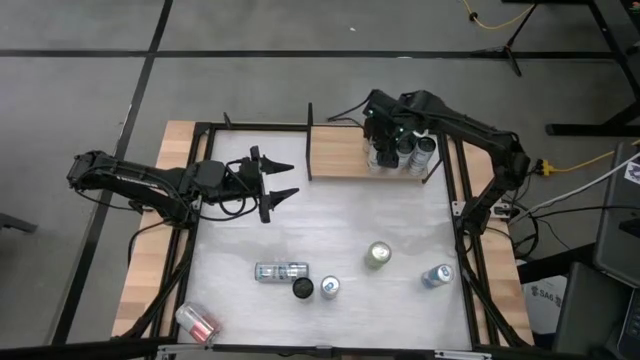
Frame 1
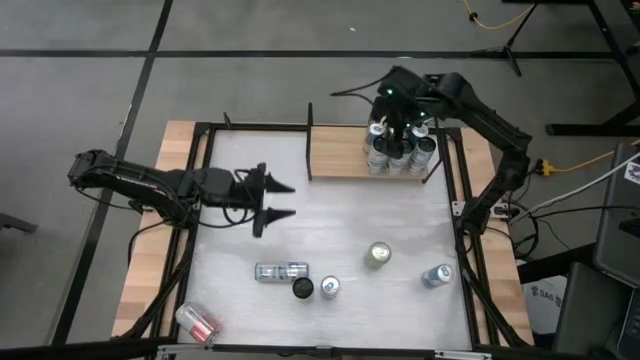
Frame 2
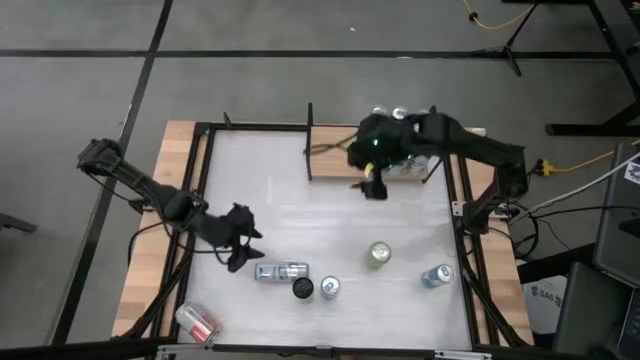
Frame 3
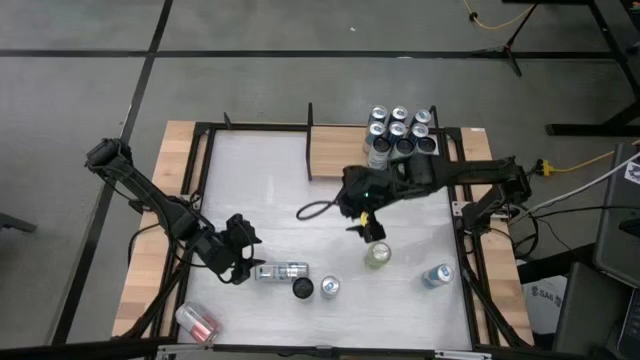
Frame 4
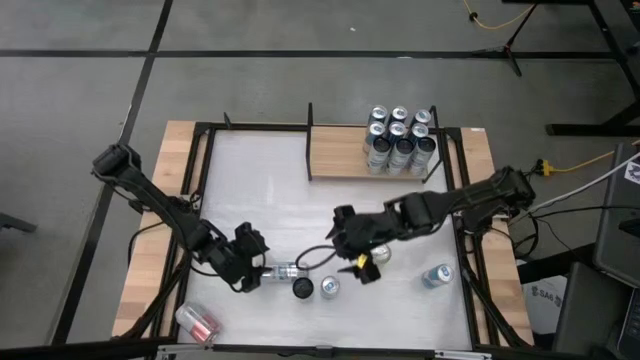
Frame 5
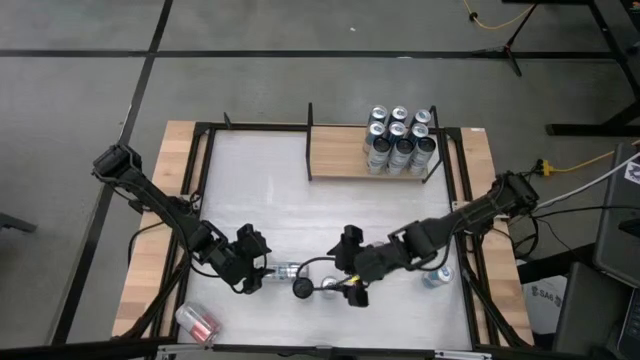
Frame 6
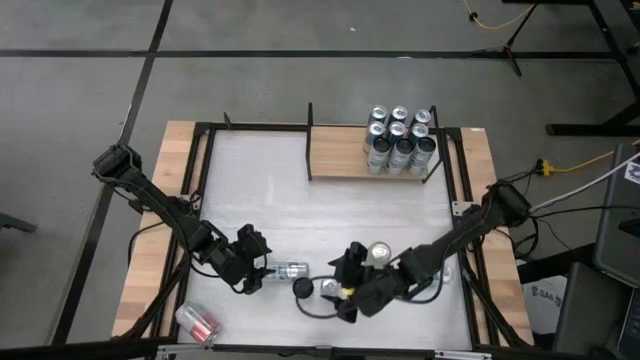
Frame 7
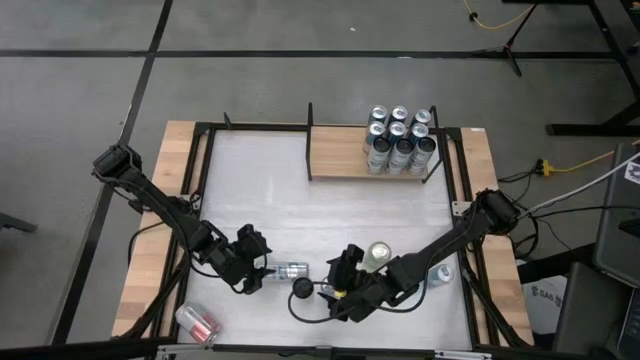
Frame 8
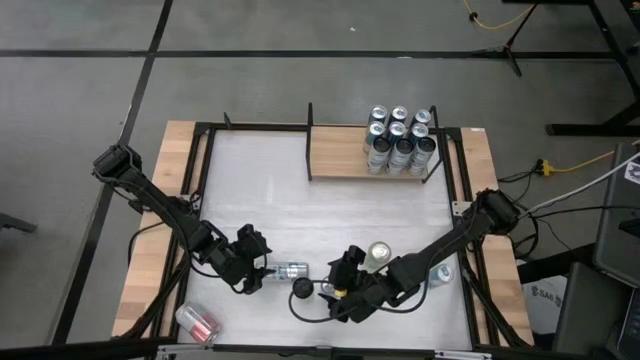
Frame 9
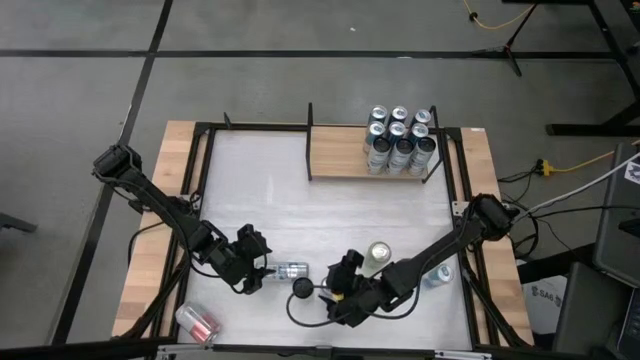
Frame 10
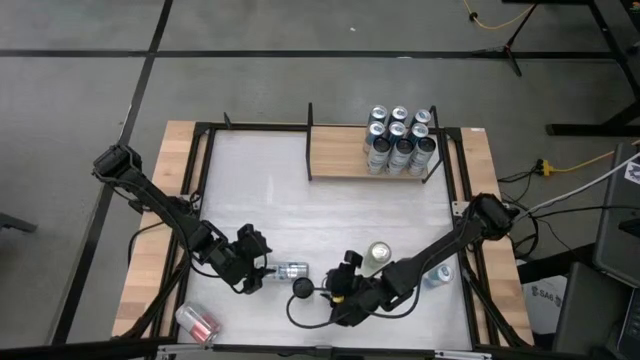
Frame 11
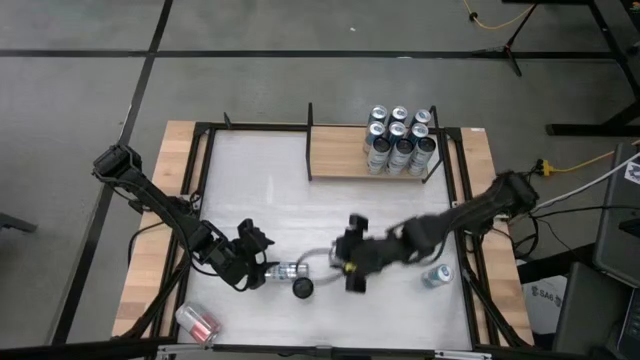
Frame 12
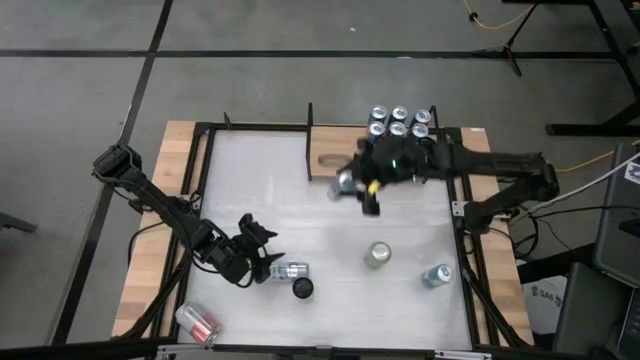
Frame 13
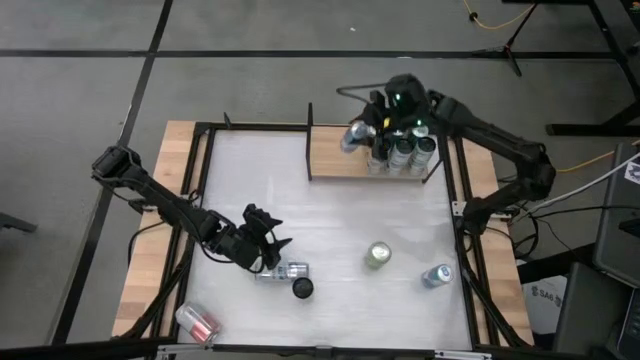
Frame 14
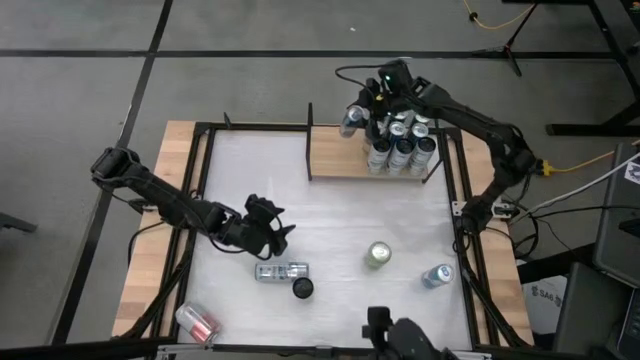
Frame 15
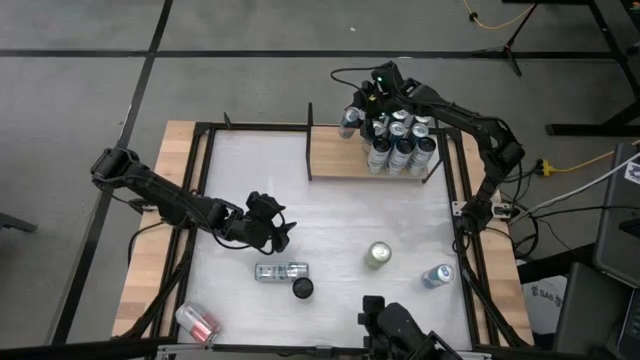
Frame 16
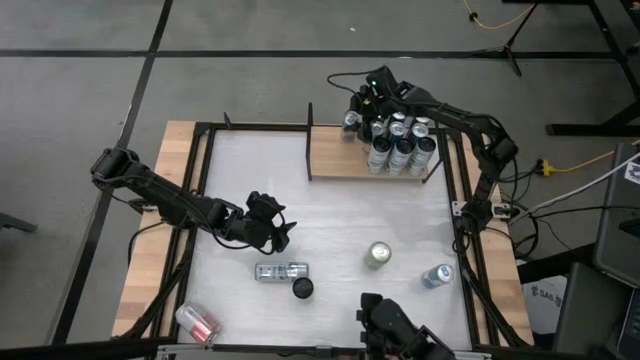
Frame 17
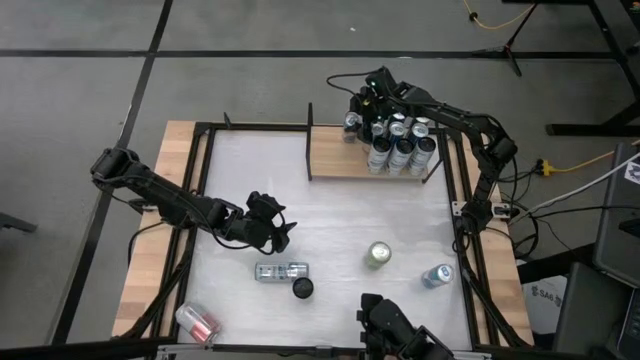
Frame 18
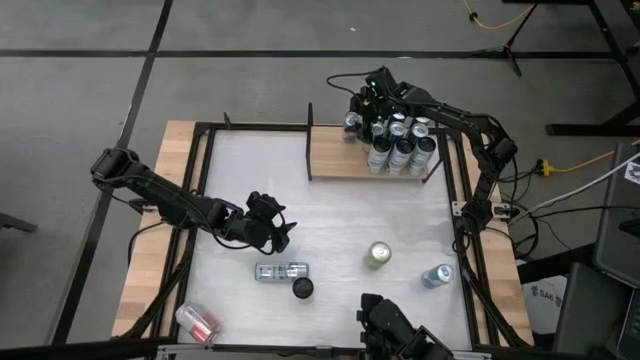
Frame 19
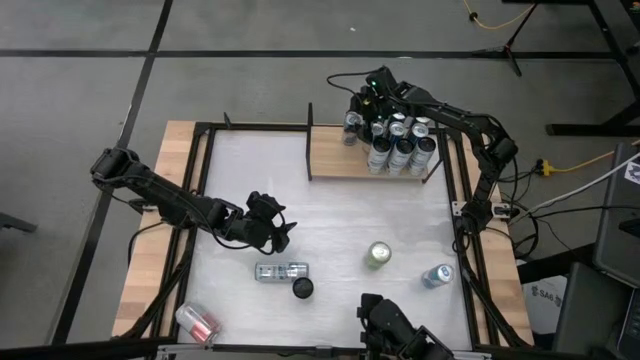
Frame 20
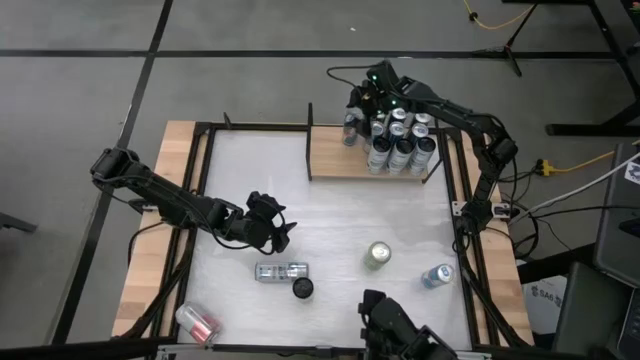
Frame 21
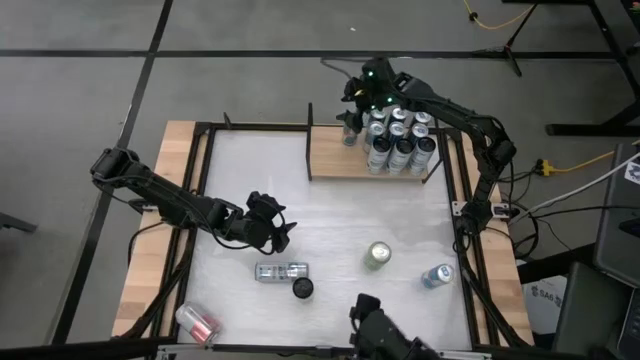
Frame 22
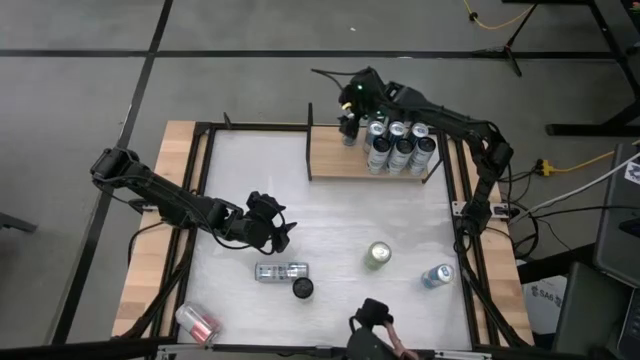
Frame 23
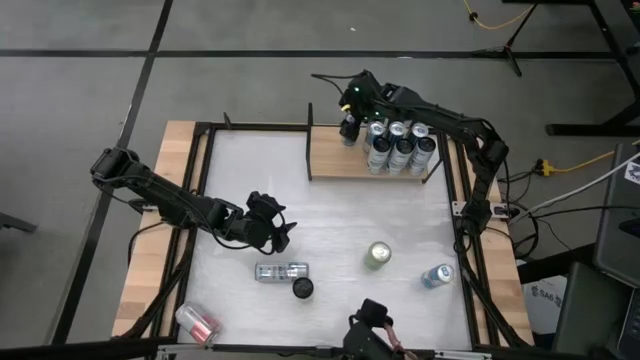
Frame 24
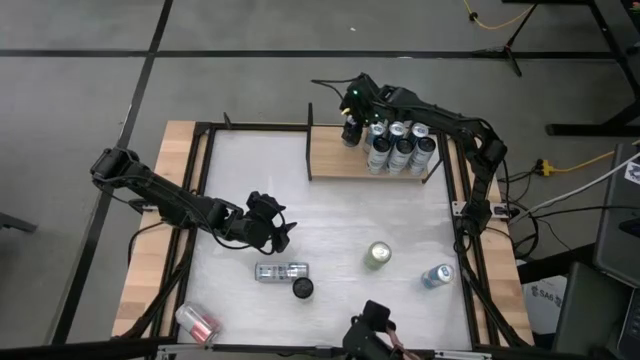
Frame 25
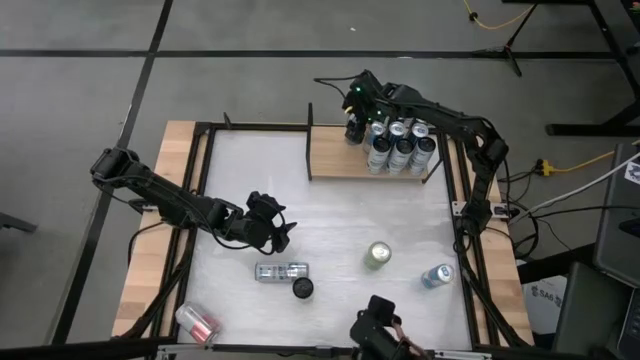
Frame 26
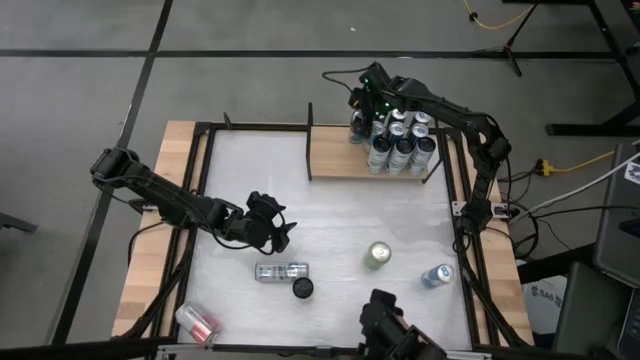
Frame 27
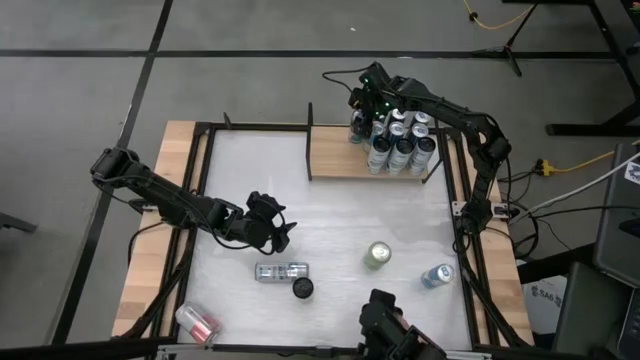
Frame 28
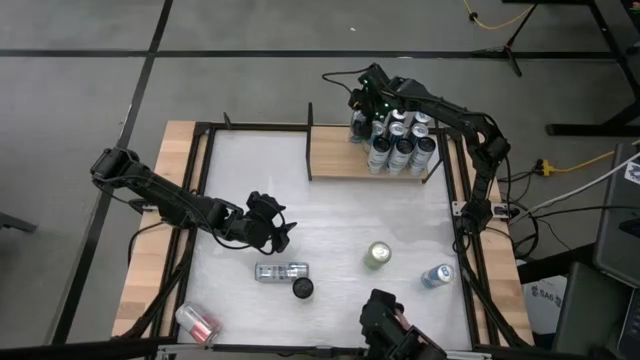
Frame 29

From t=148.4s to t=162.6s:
Task: Place canned beverage on shelf
Put the blue soda can on the shelf aligned with the other blue soda cans

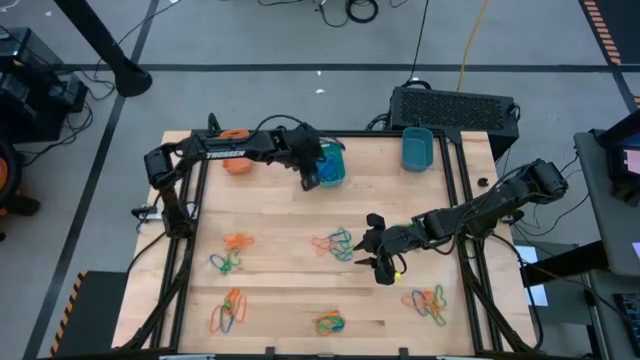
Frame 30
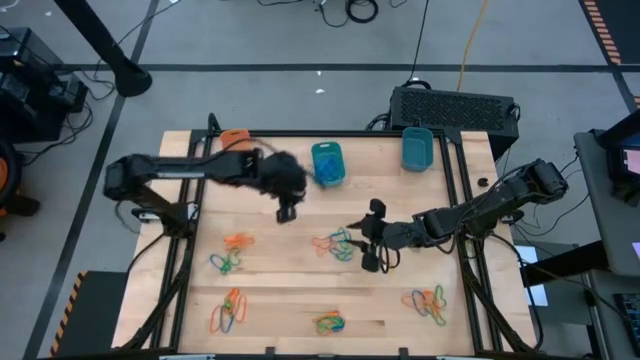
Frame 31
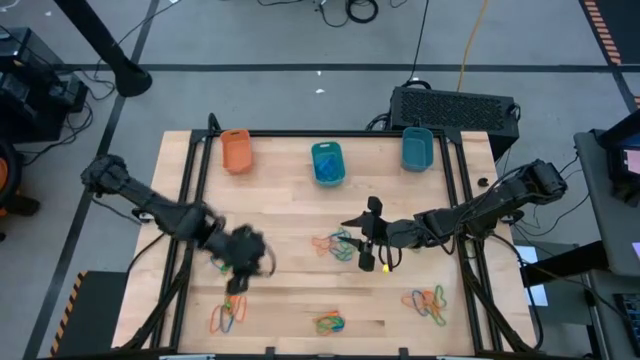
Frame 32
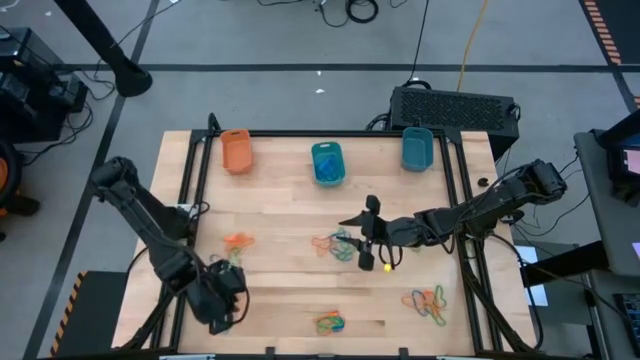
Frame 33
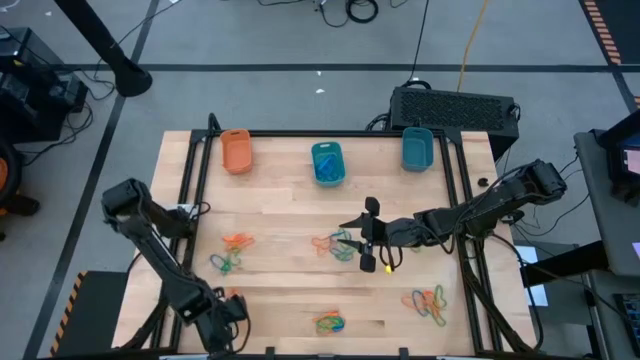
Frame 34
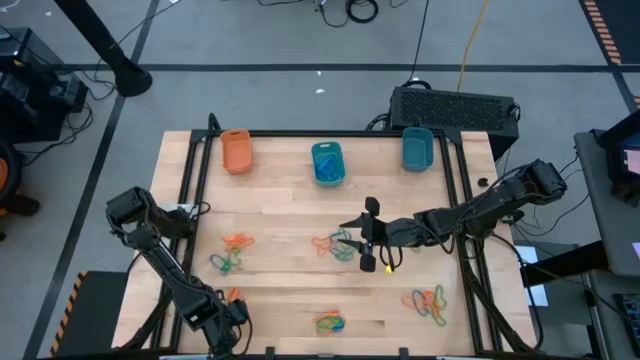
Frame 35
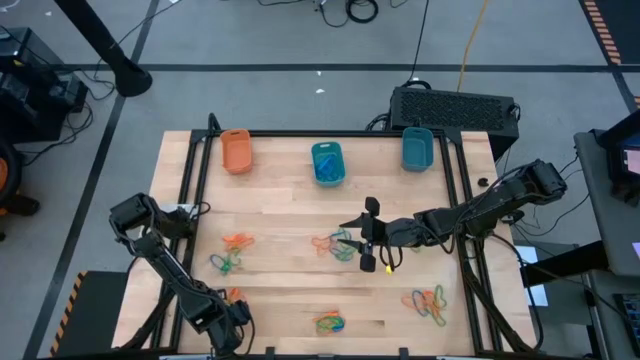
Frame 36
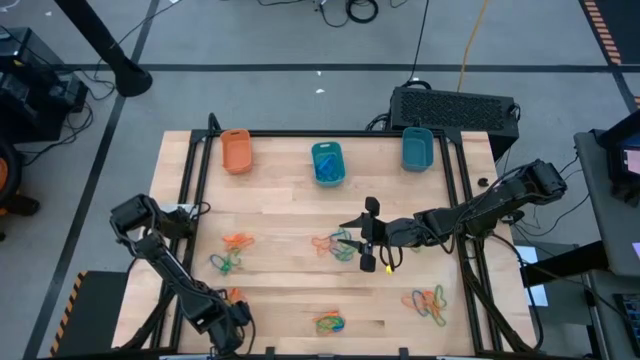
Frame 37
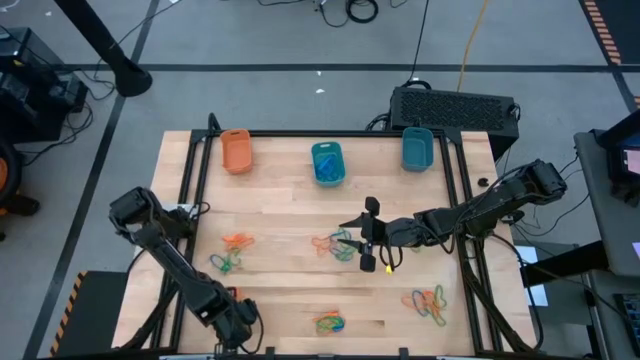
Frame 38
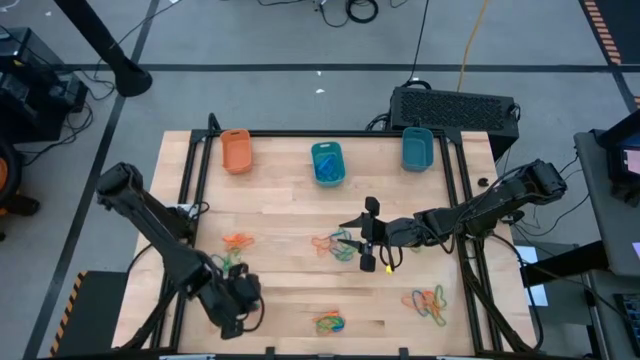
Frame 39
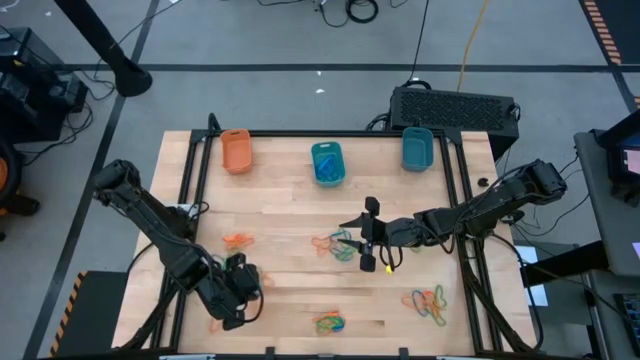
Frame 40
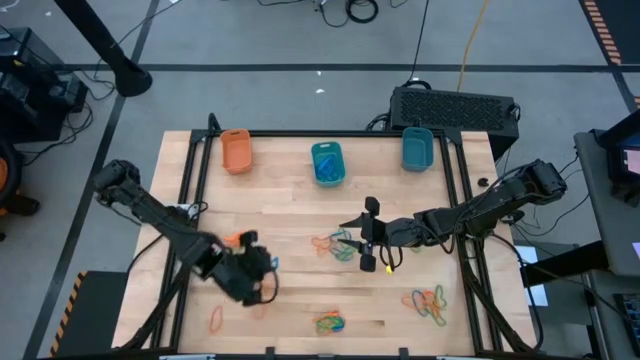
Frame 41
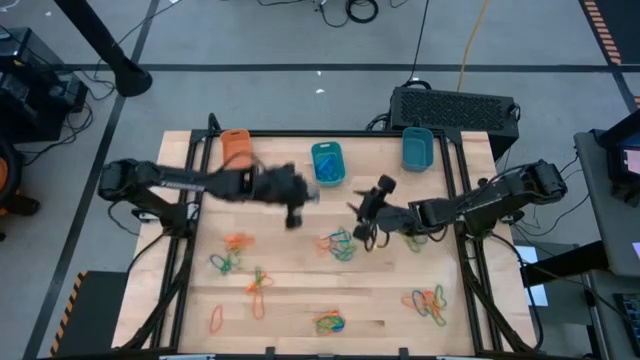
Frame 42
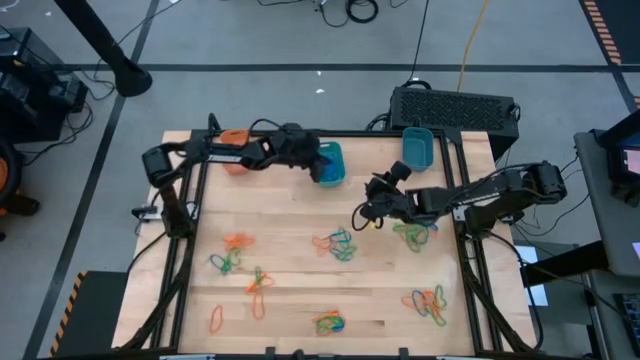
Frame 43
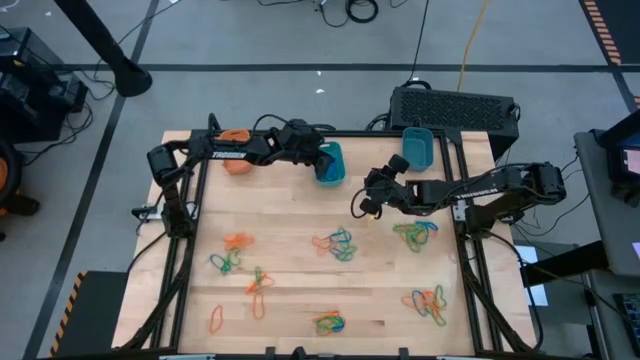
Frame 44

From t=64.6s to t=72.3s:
Task: Sort rubber bands into baskets
Put the blue rubber band into the light blue bin
